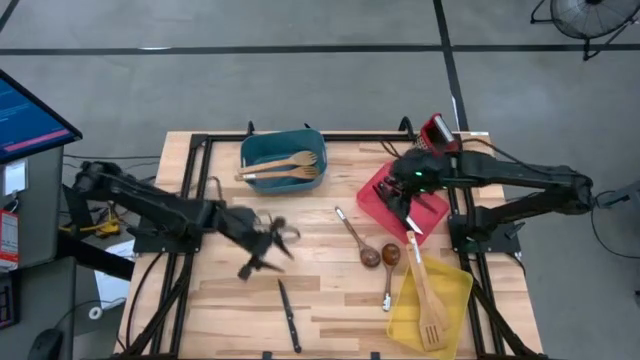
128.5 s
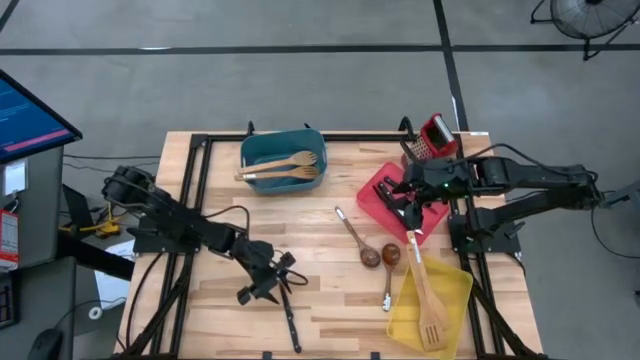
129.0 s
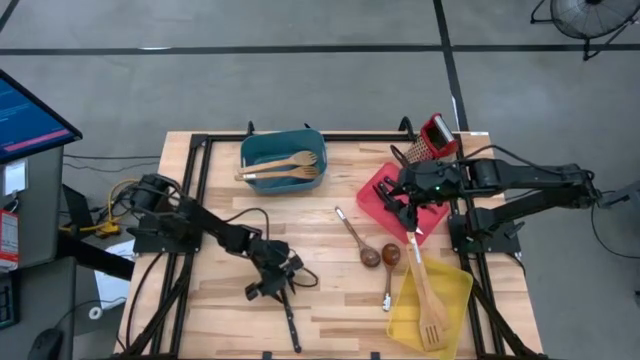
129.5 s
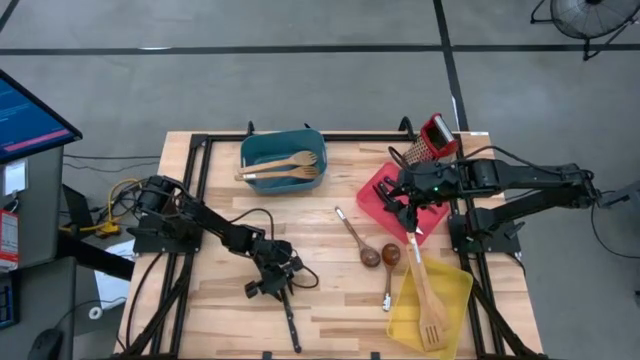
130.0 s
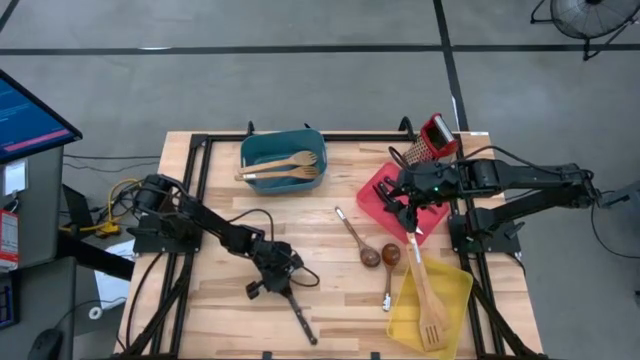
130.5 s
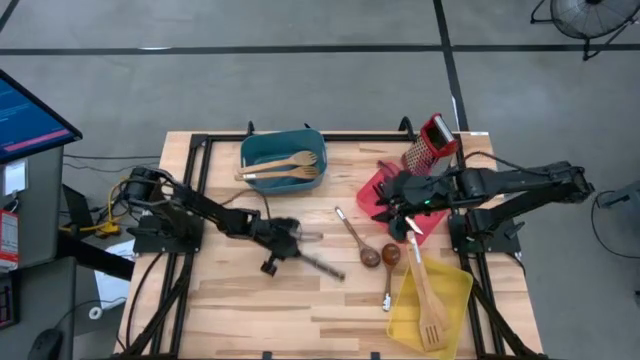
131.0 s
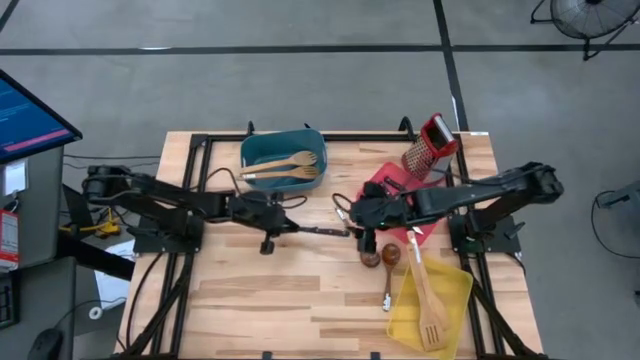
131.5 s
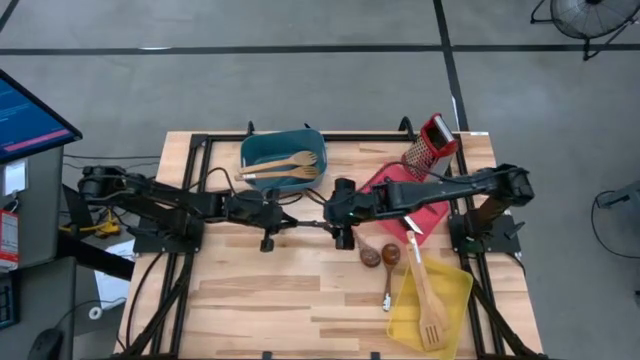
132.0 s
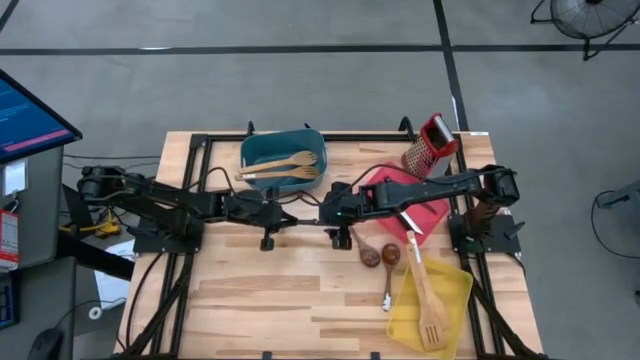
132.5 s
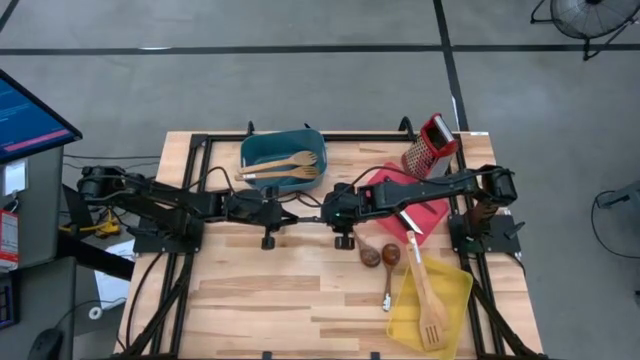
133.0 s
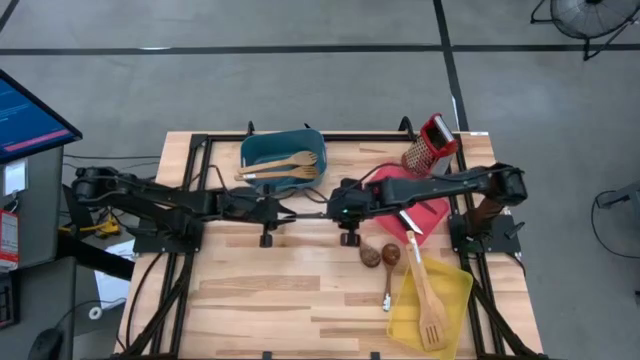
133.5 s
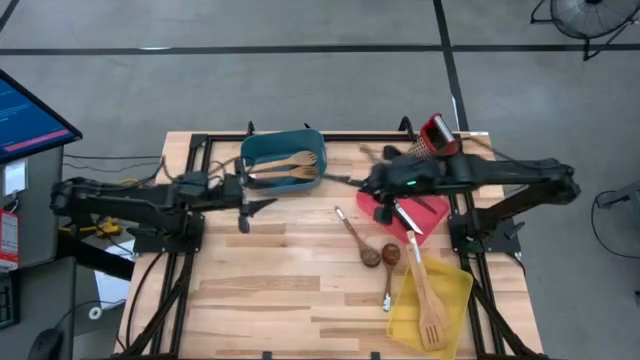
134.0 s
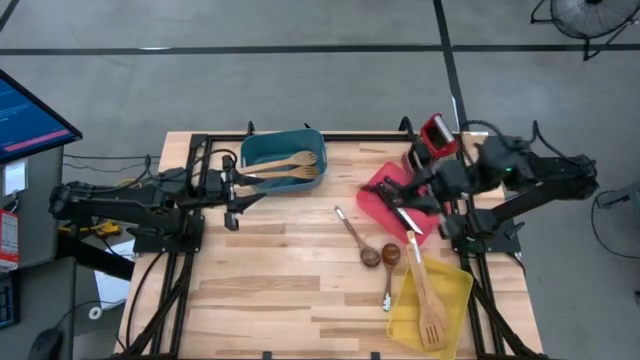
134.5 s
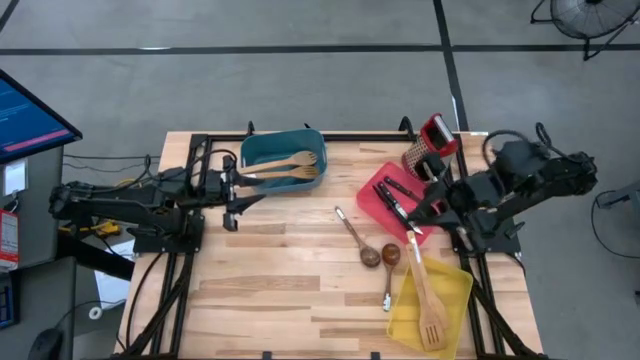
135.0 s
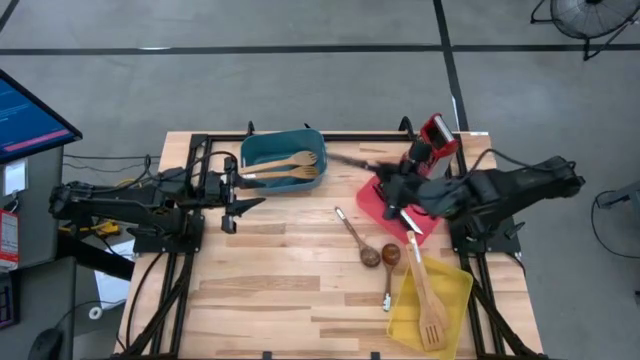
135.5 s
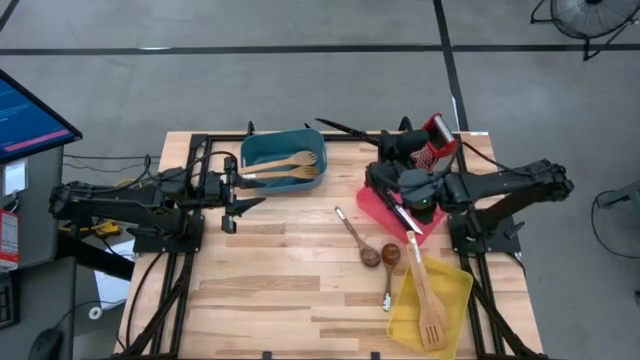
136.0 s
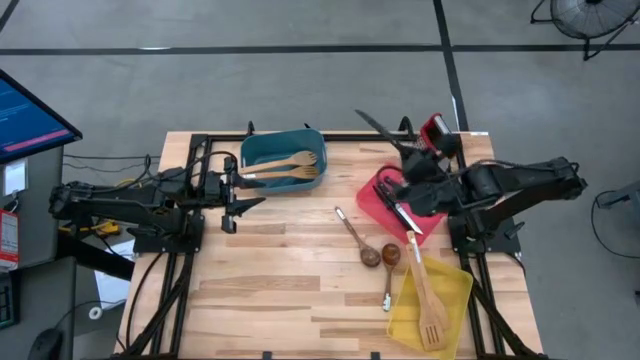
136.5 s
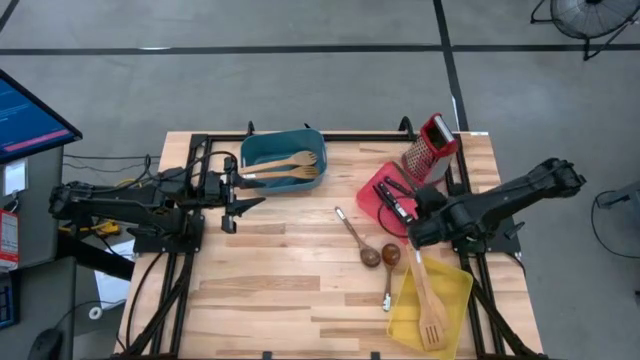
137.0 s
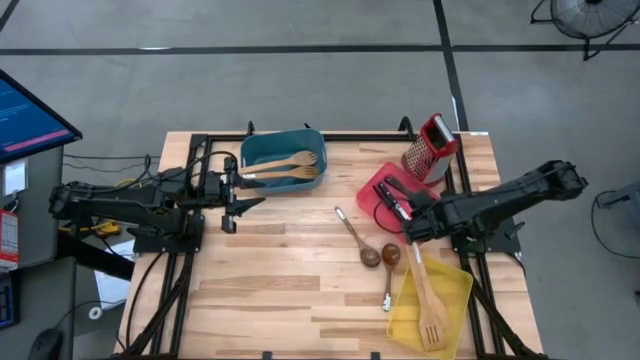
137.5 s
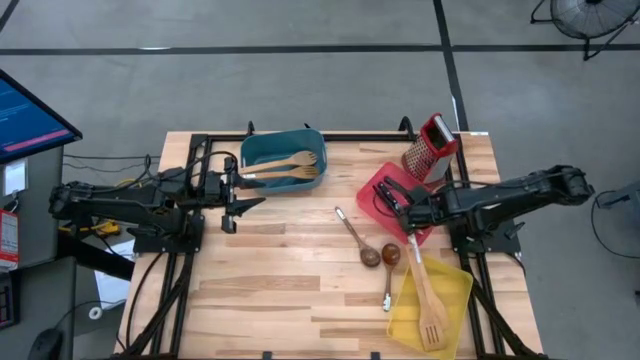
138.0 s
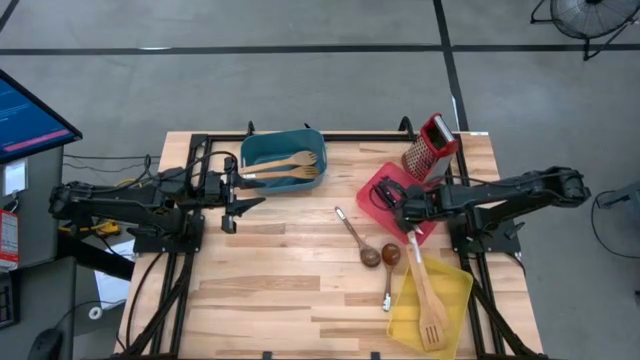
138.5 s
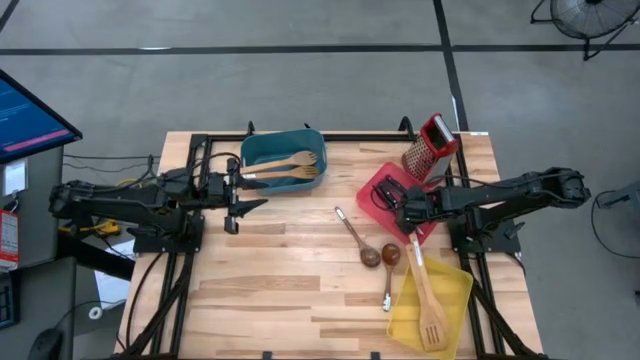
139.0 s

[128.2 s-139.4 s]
Task: Pick & Place Kitchen Items
Put the black kitchen knife into the red bin

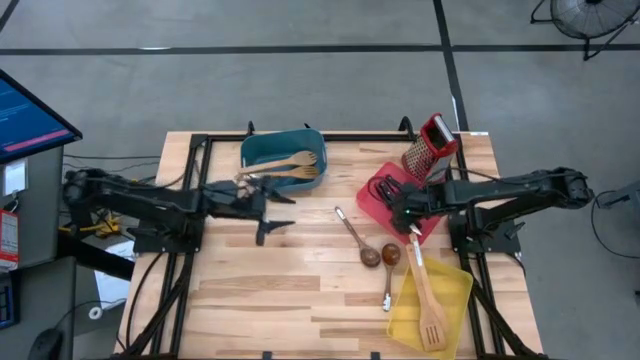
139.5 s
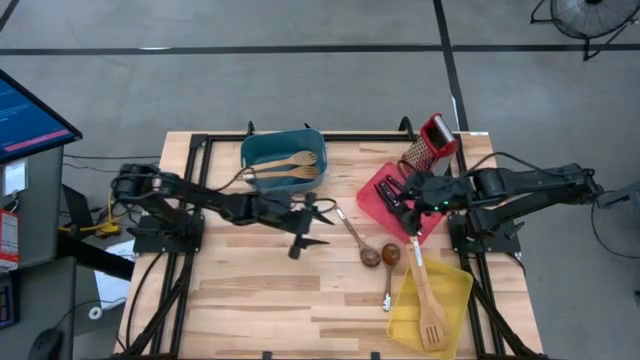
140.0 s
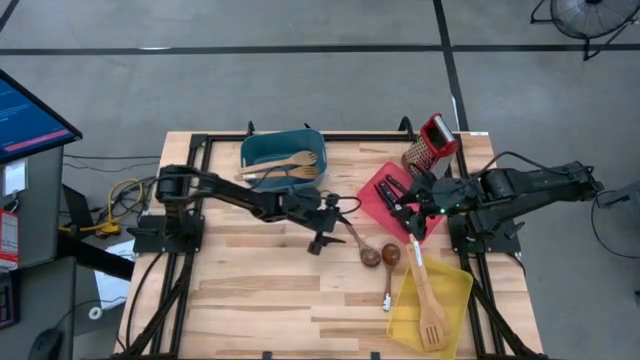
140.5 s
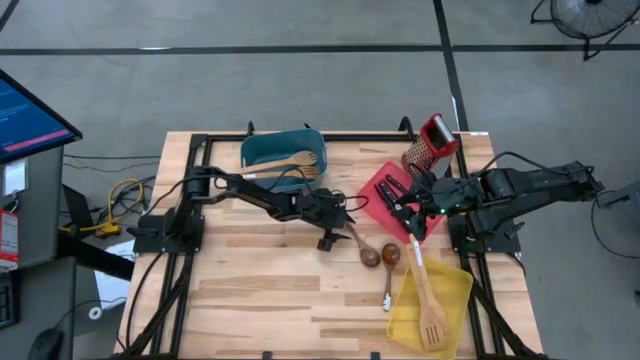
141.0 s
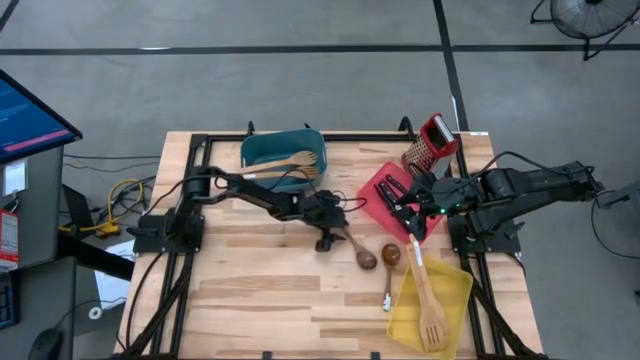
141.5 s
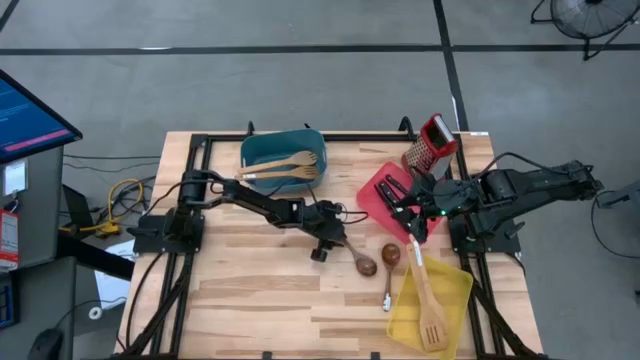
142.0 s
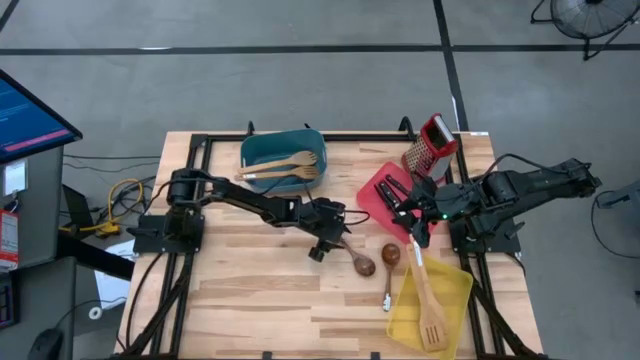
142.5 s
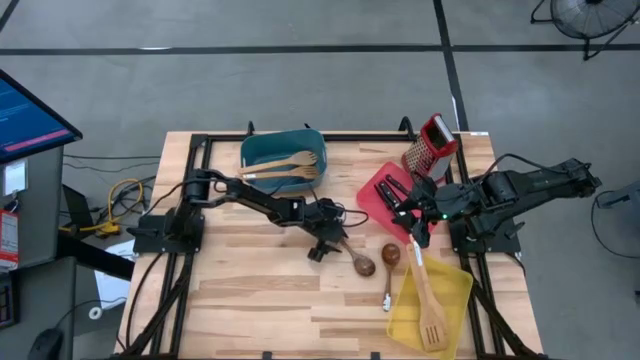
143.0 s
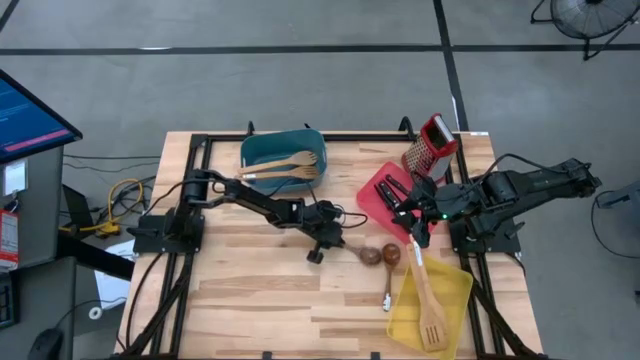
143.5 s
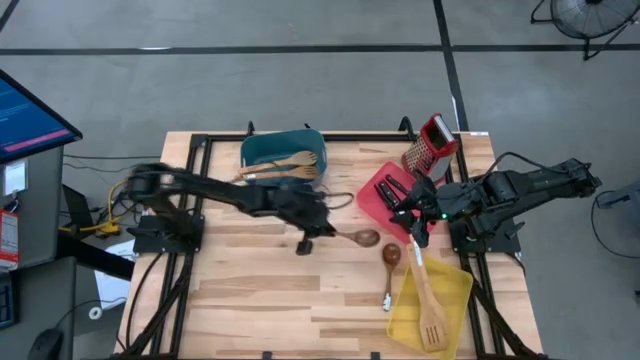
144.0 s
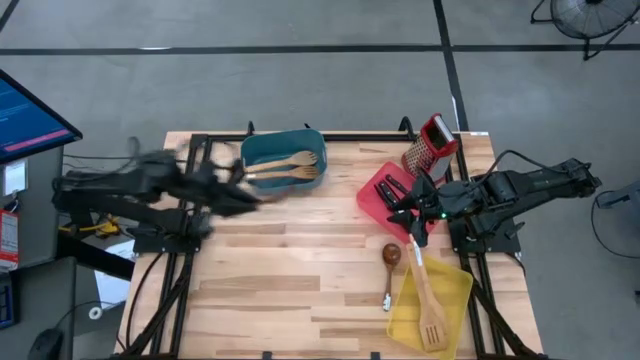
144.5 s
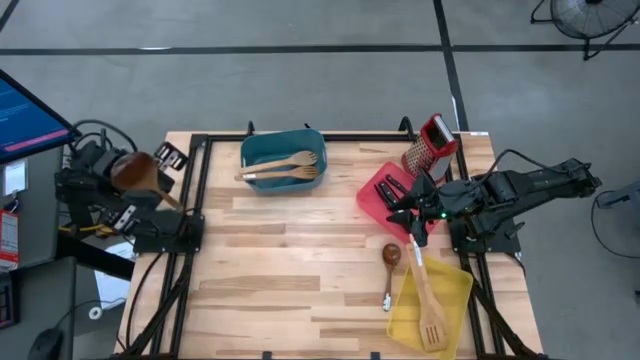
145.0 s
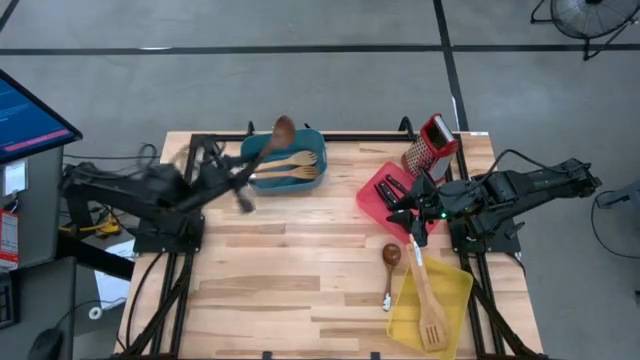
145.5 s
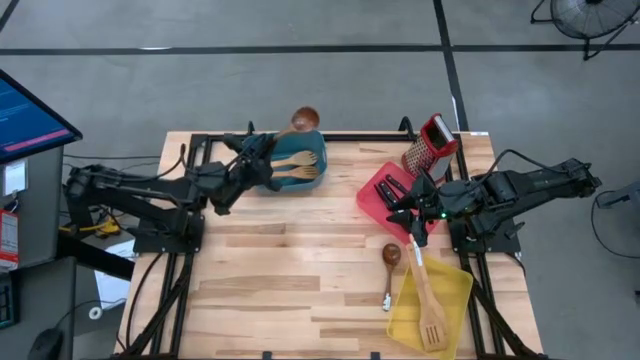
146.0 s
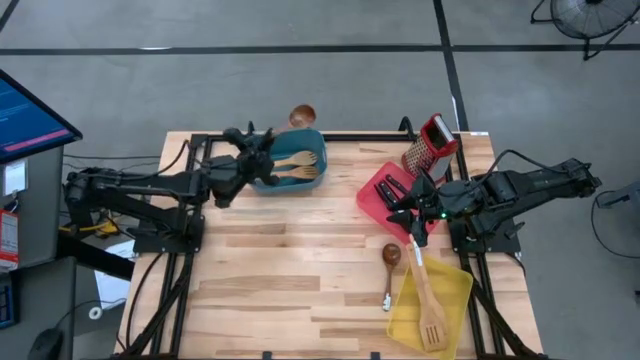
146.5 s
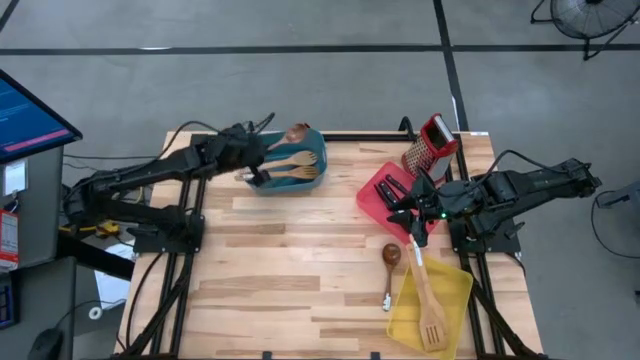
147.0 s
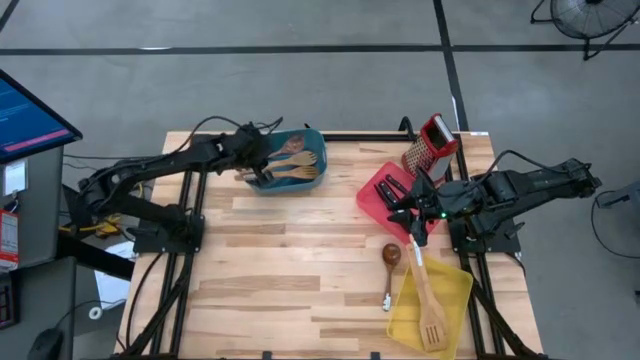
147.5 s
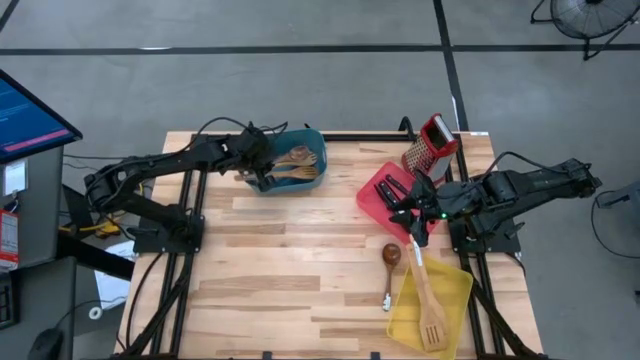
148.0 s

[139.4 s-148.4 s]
Put the wooden serving spoon into the blue bin

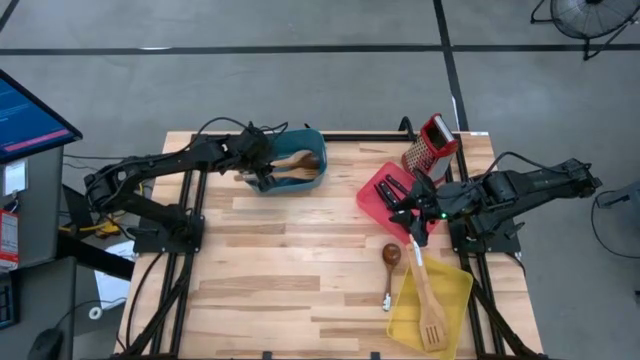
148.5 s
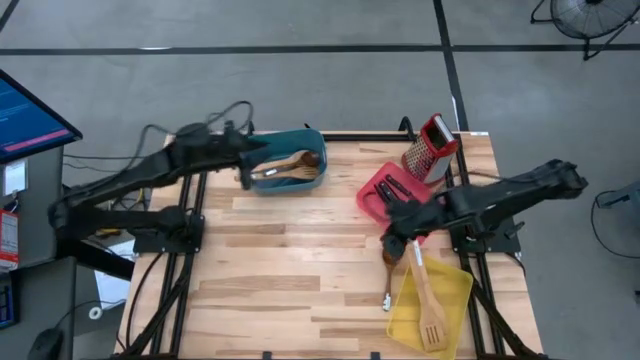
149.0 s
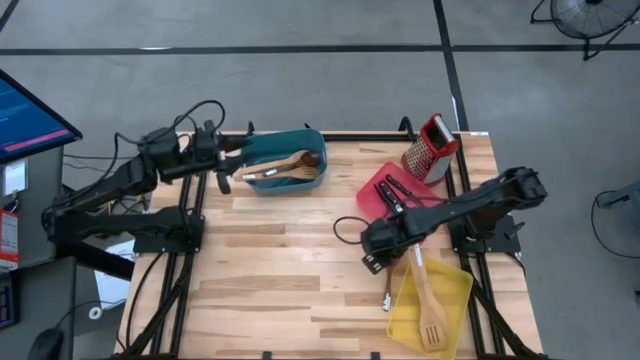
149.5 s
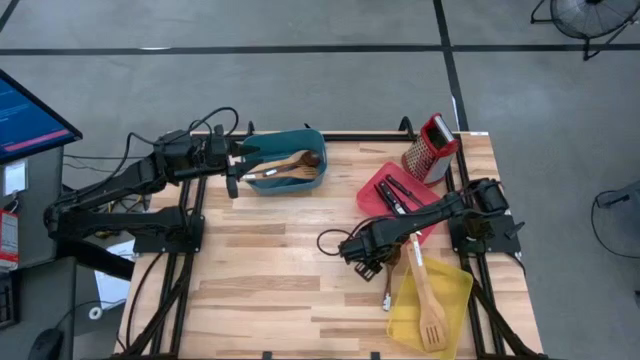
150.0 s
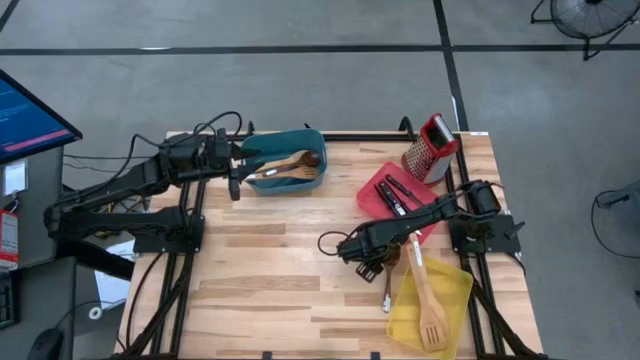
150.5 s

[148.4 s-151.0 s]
Put the wooden serving spoon into the blue bin
